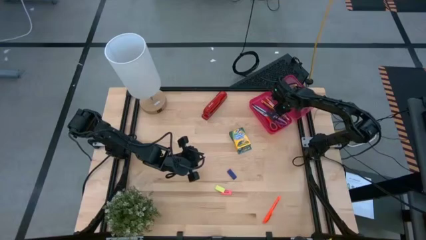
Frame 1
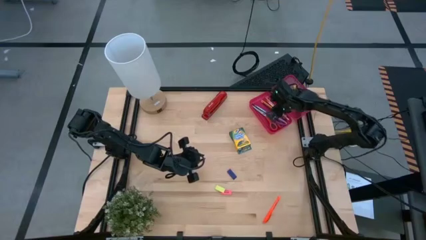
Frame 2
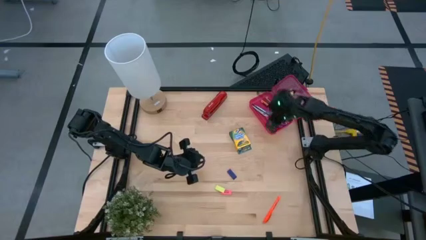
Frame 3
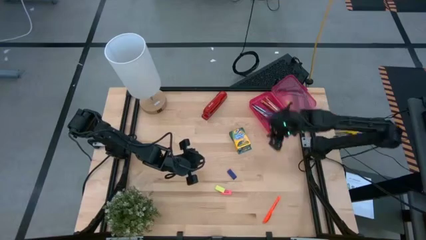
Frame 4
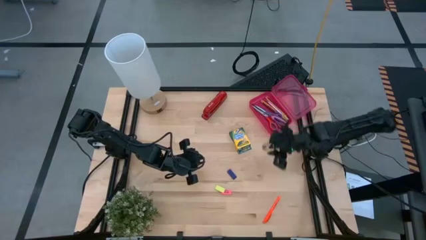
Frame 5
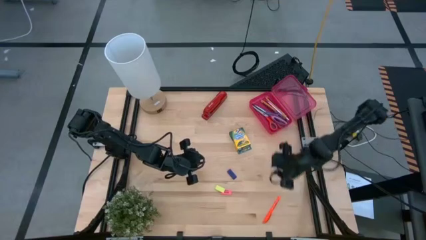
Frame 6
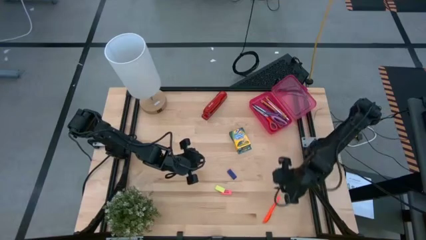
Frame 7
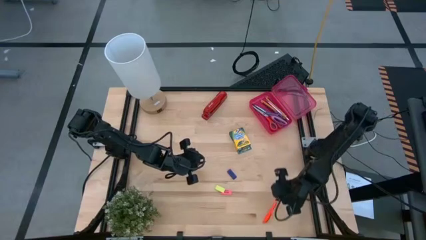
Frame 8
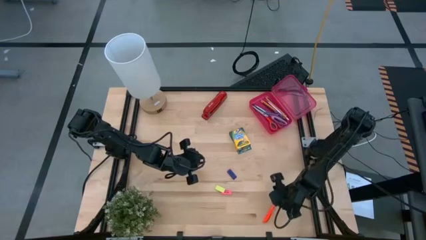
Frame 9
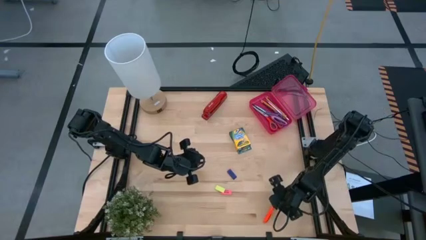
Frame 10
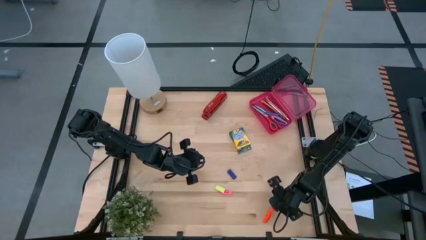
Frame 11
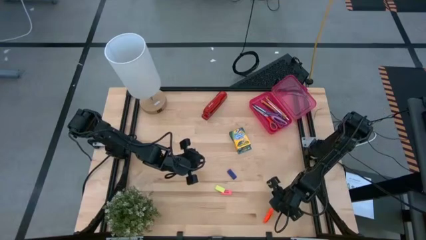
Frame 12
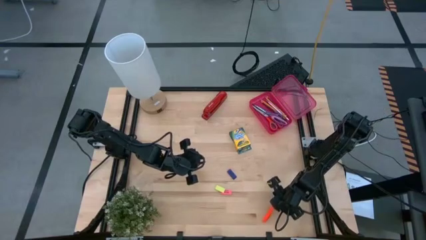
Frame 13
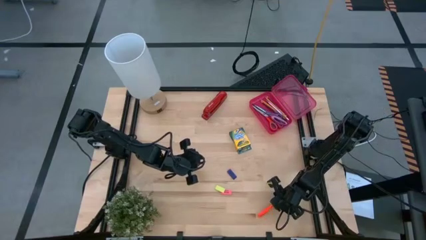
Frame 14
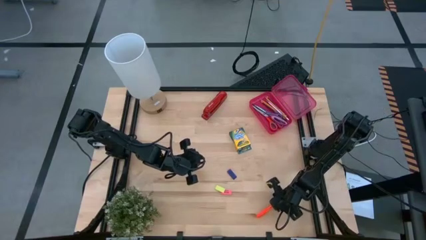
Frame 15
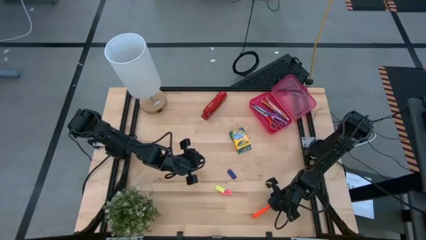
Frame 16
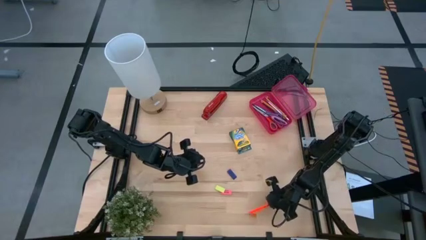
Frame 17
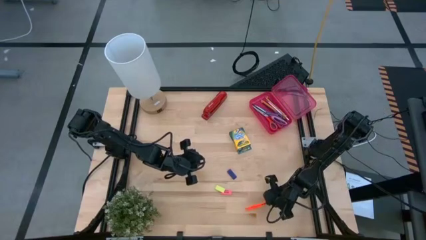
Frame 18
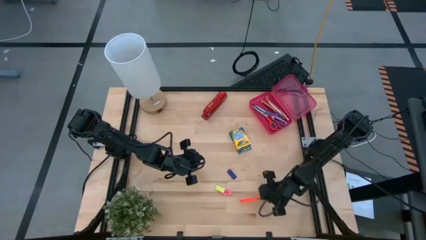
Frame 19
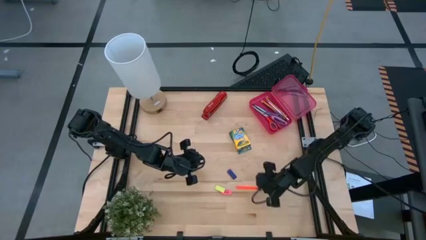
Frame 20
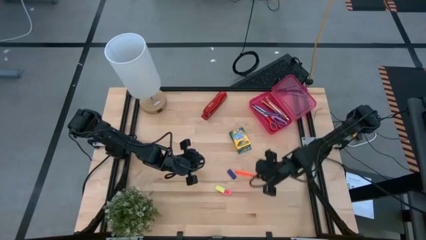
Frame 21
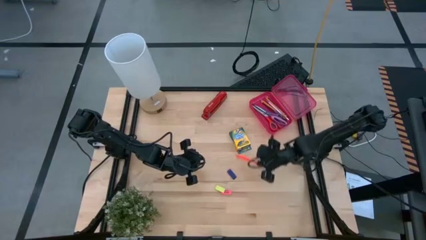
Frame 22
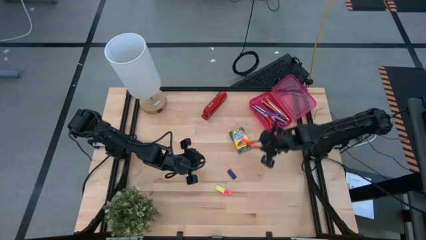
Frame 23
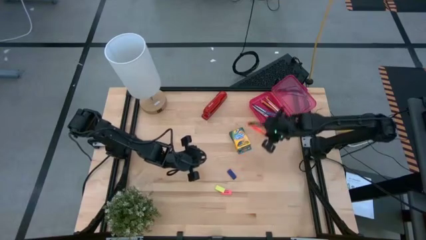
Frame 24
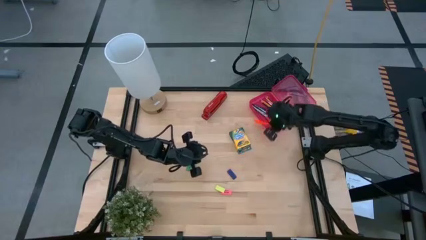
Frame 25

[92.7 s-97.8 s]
Task: Pack school essentials
Put the orange pen into the pink supply box

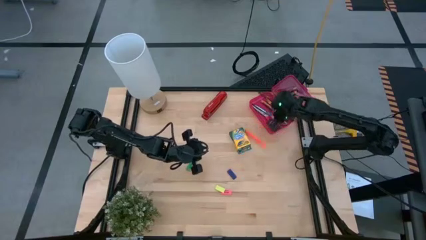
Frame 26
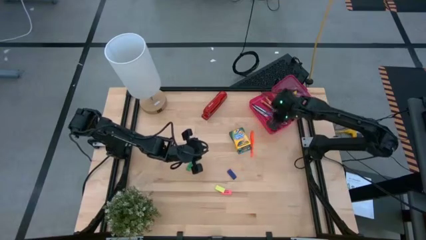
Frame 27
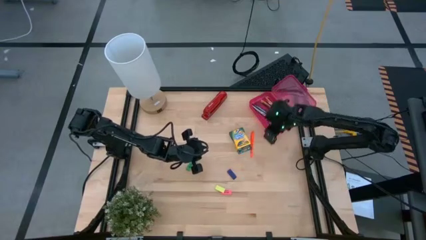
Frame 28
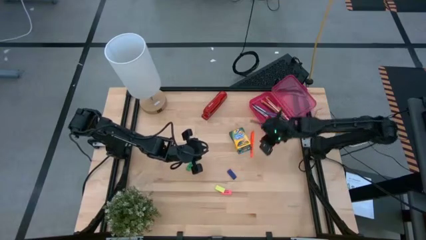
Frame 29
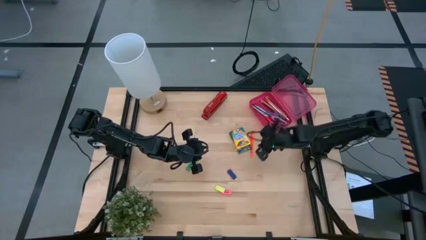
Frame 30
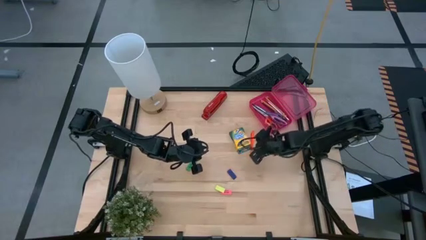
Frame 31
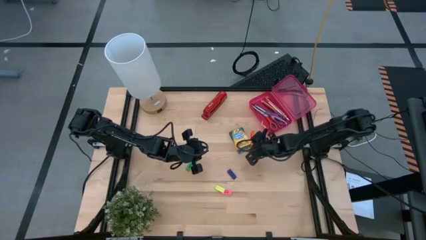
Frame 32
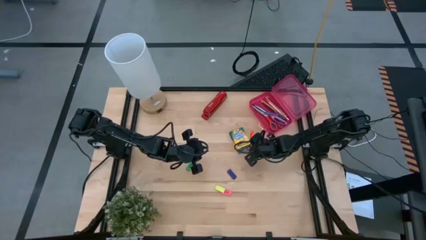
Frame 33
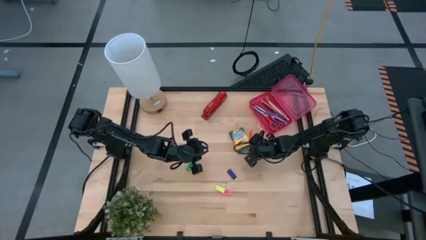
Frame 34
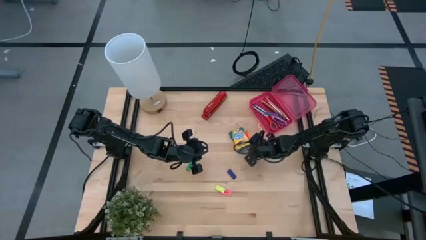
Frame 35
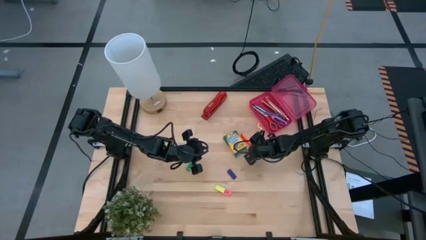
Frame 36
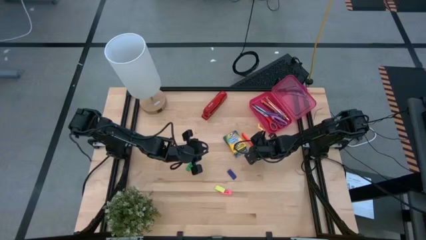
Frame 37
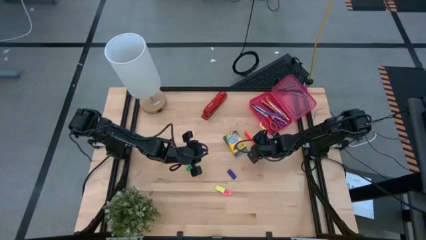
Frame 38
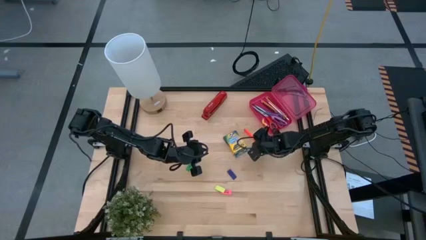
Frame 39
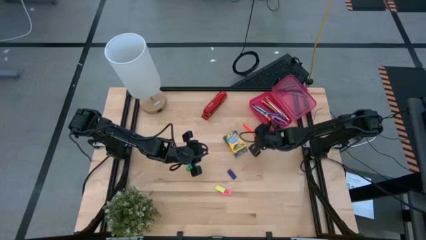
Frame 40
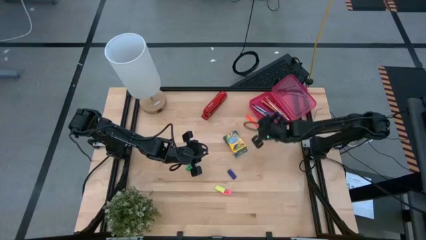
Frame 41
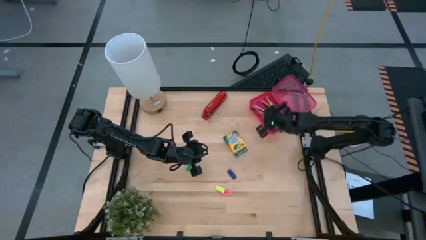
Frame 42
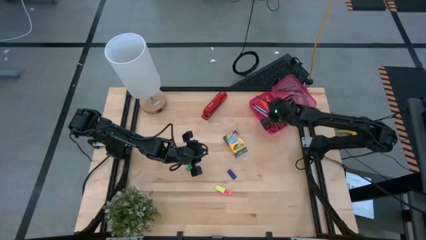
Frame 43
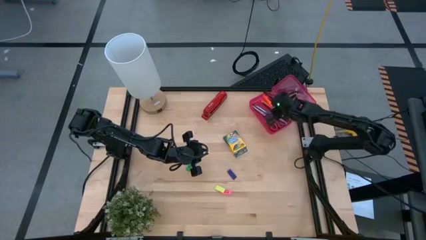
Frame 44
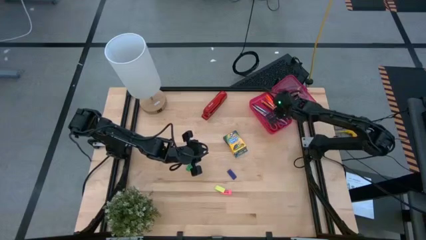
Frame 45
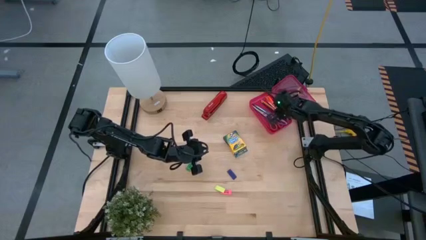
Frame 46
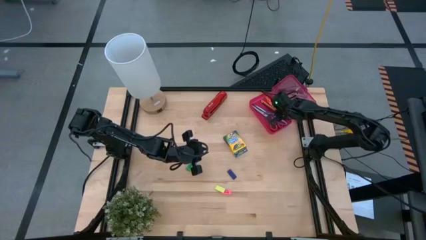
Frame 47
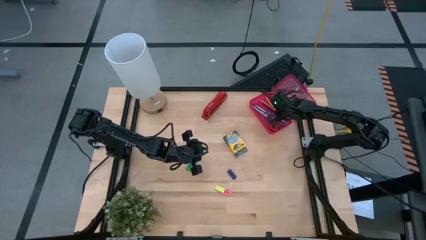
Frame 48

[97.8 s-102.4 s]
Put the orange pen into the pink supply box

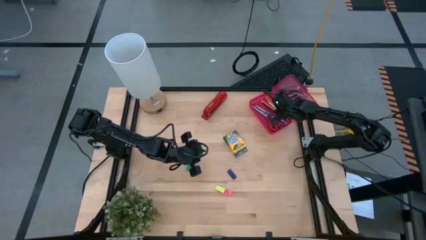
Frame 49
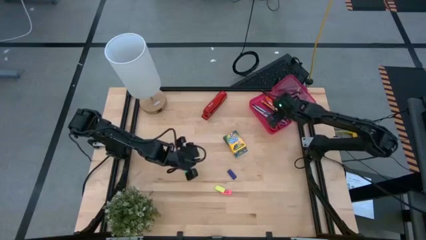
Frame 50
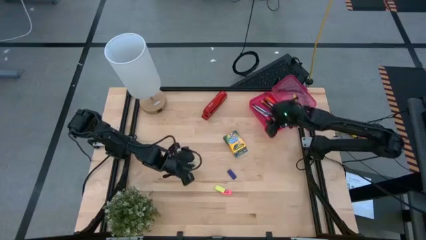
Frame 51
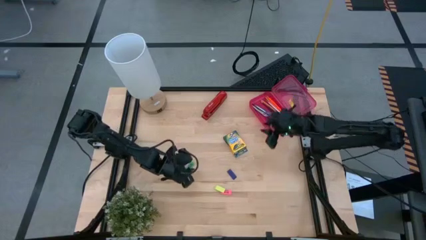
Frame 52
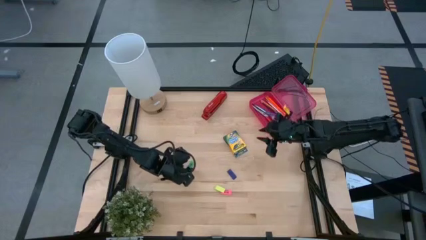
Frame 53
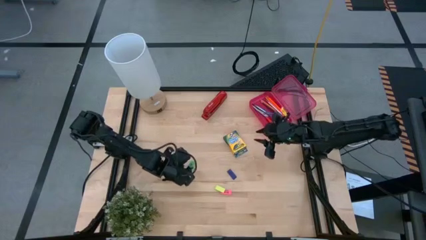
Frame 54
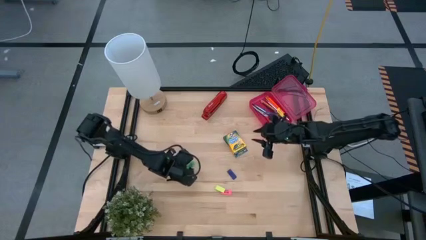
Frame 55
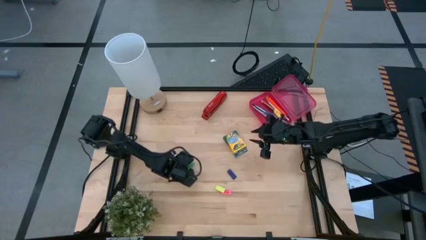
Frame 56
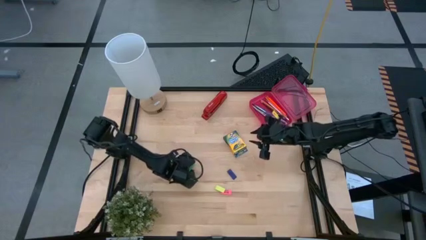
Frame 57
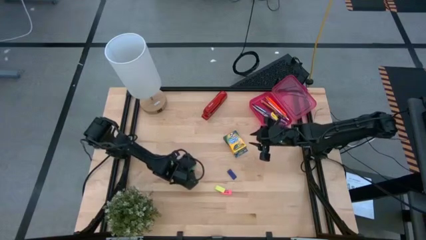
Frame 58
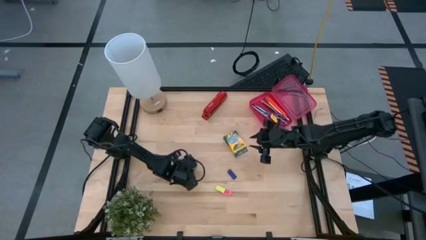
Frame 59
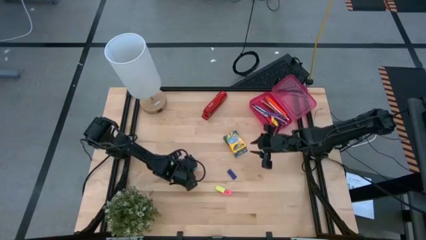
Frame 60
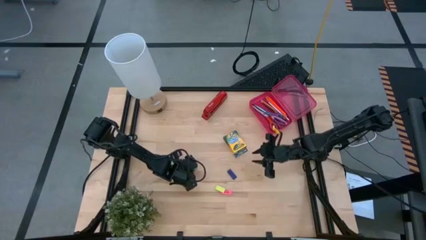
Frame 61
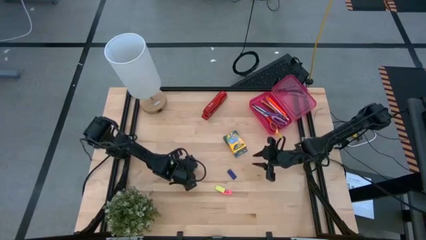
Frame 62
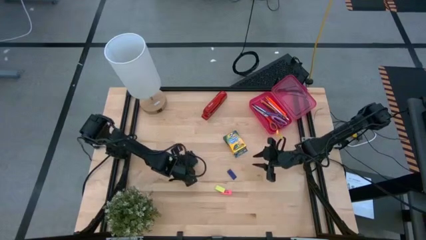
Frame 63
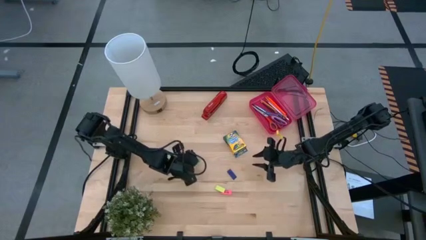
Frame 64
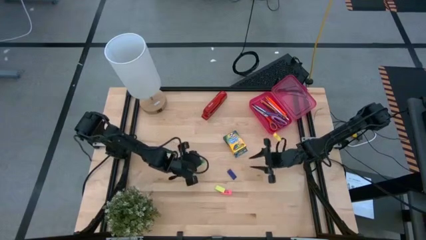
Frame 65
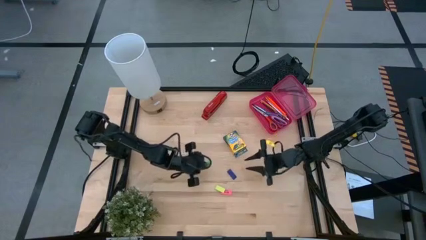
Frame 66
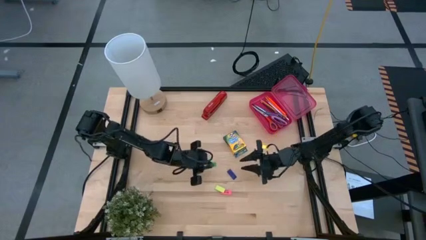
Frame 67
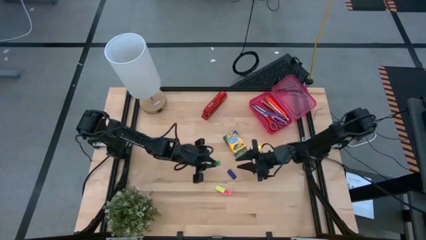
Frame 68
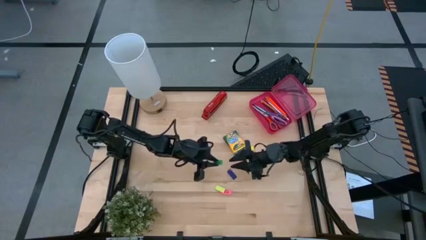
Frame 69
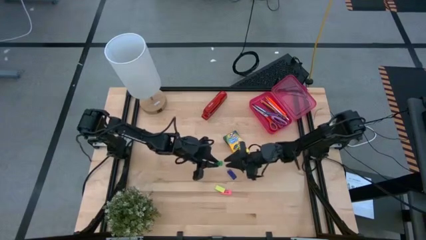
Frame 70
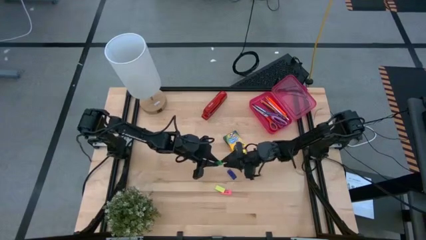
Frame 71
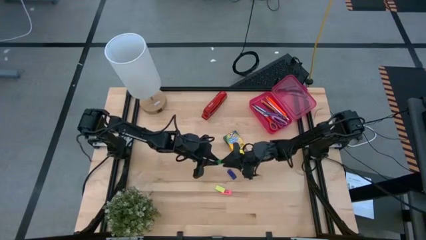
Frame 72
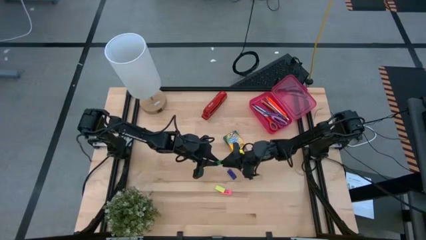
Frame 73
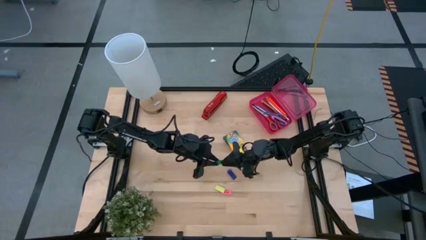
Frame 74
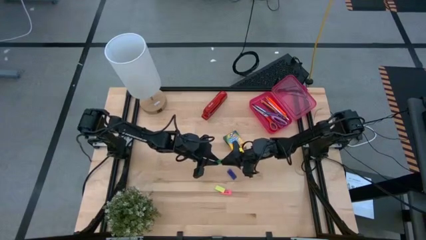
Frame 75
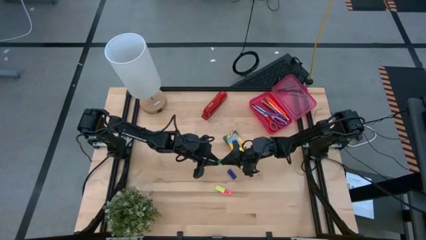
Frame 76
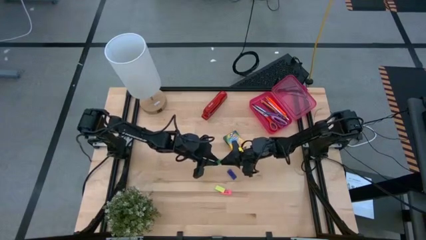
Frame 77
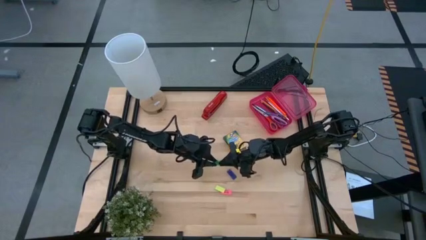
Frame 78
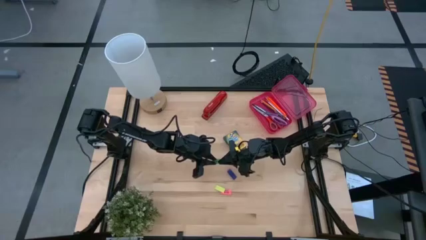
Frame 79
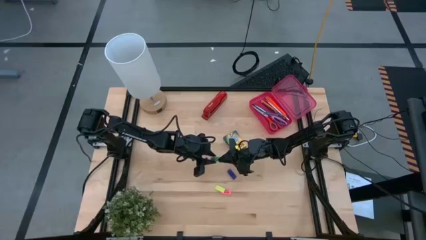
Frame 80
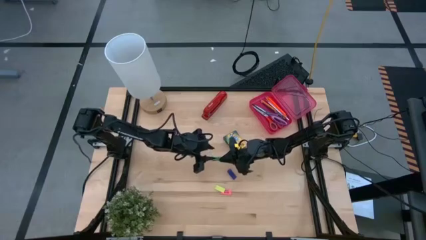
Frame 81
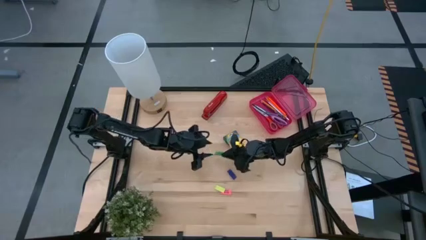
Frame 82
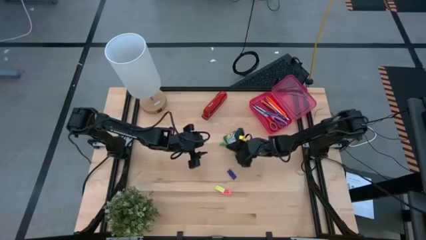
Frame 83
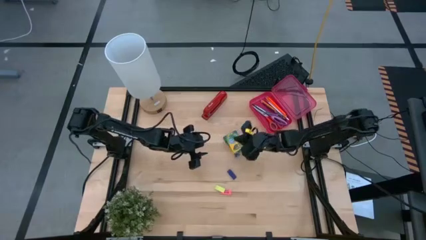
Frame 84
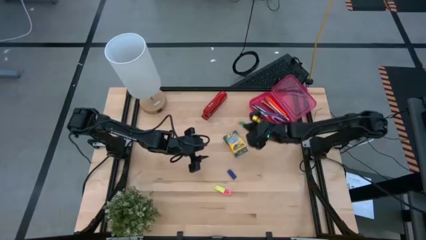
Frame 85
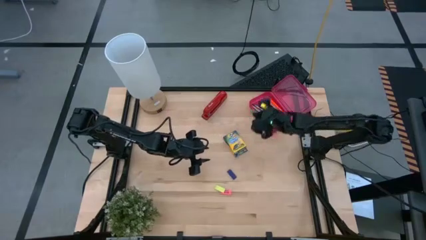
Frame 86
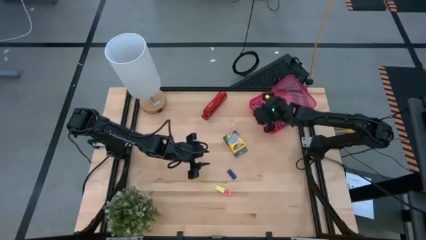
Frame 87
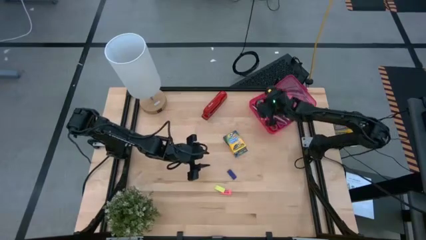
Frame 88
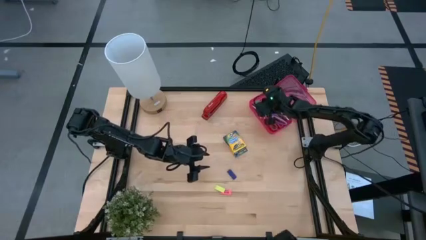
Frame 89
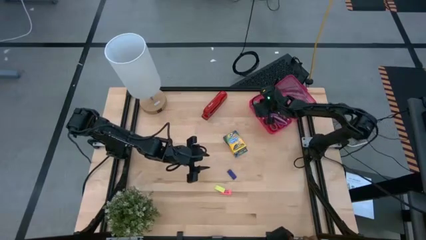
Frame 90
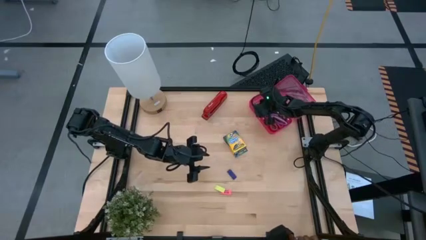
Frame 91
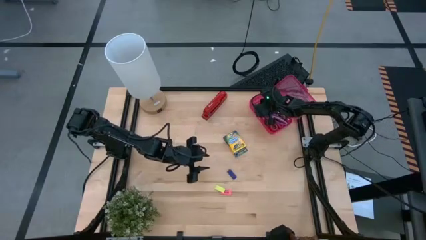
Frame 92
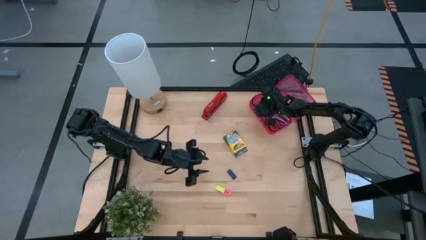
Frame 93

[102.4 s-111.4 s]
Put the green eraser into the pink supply box
